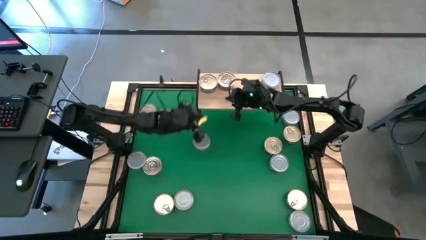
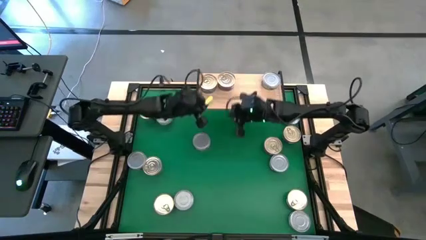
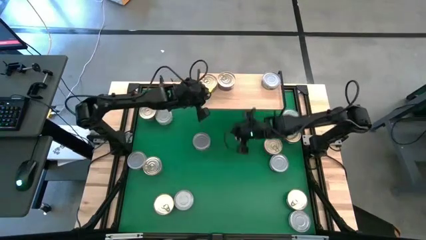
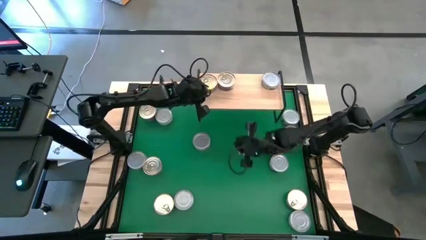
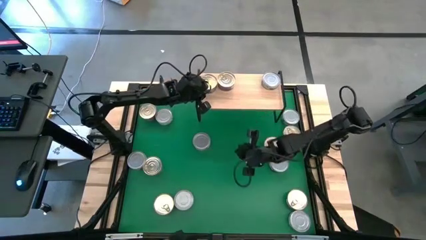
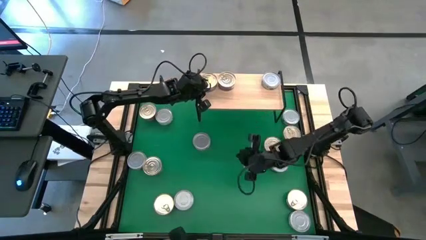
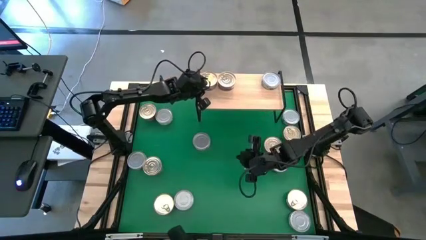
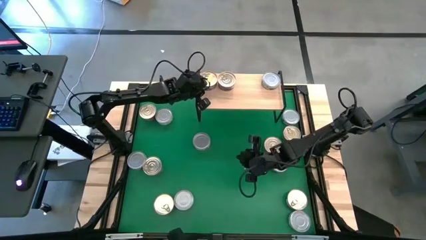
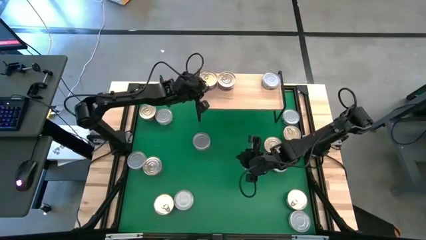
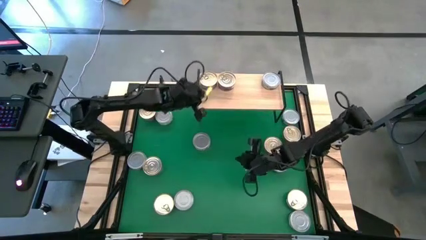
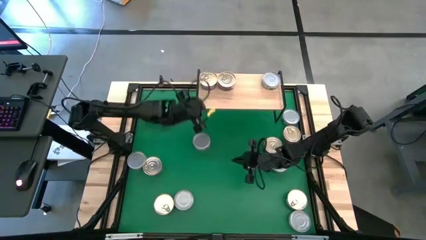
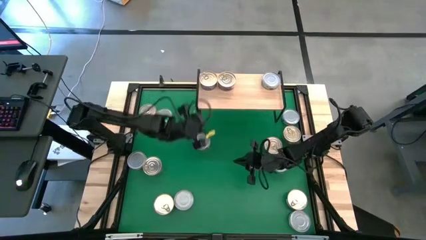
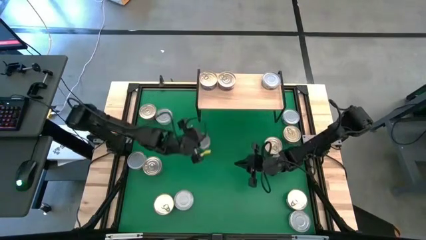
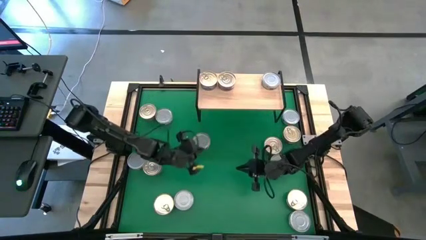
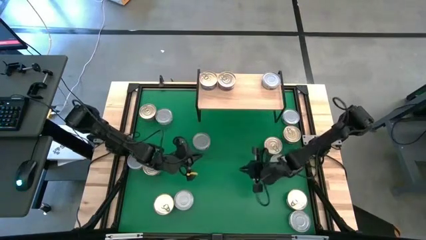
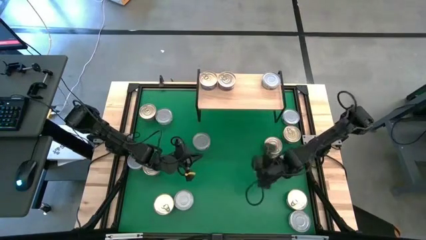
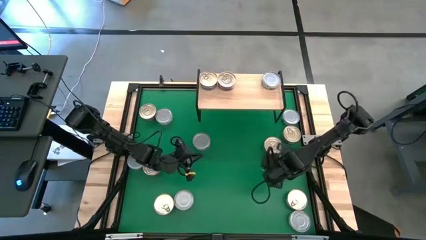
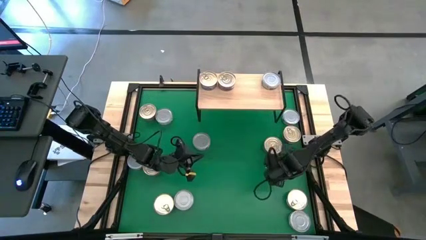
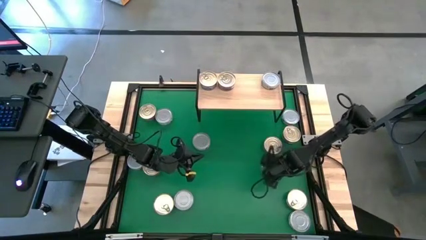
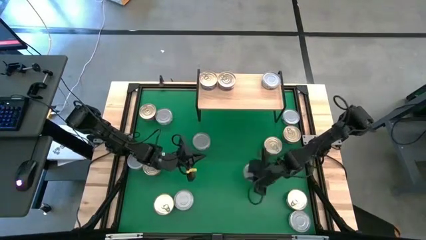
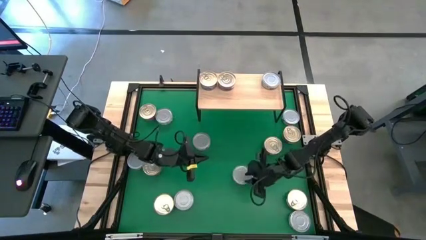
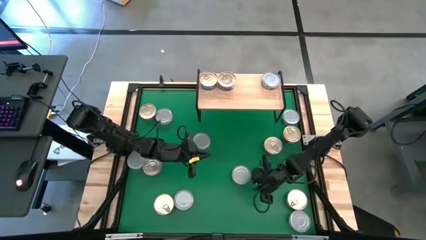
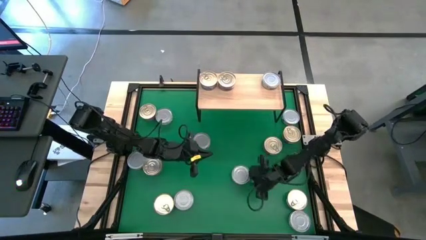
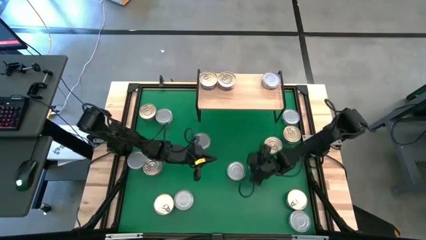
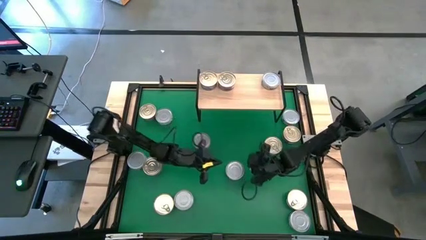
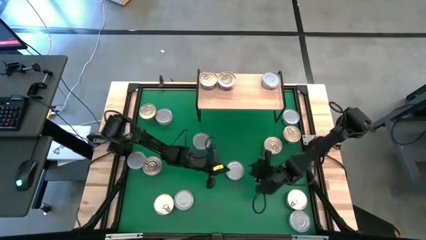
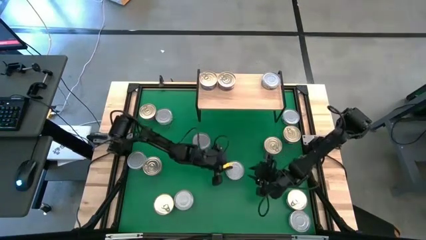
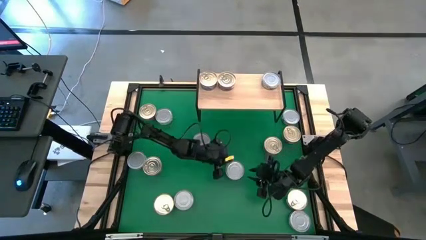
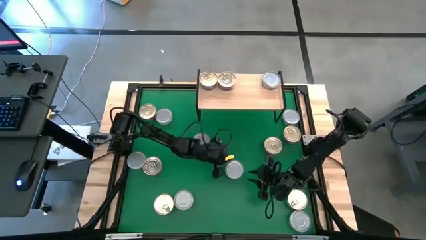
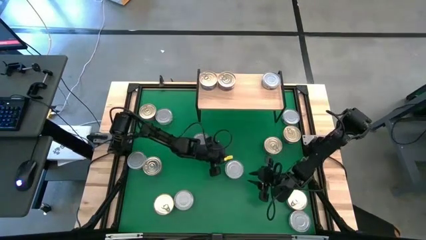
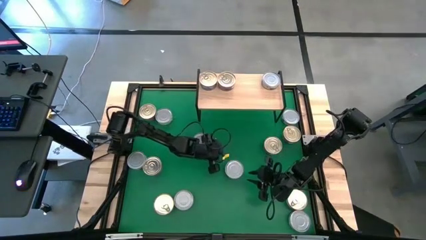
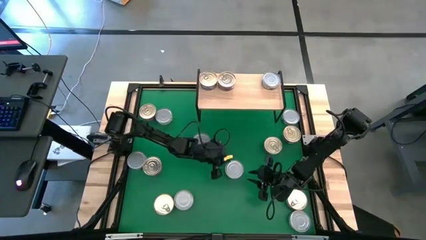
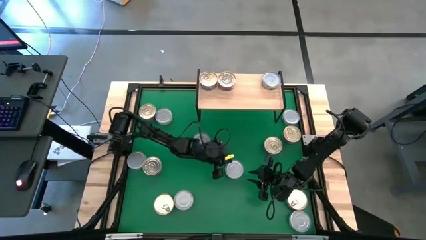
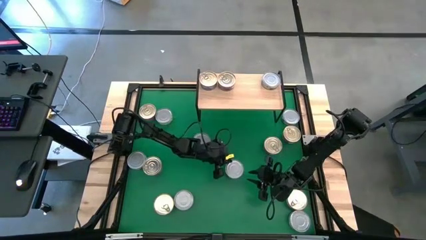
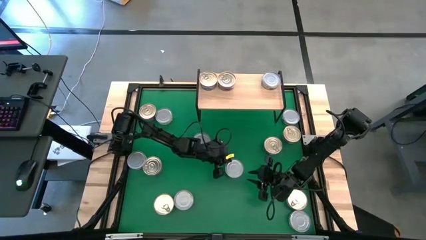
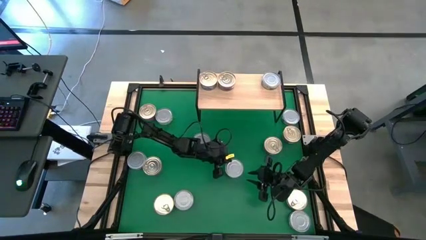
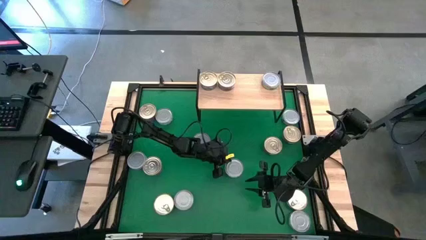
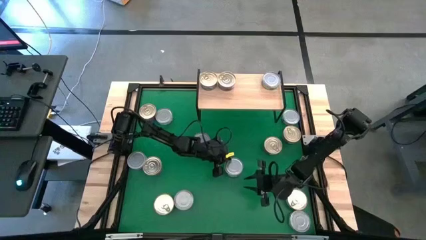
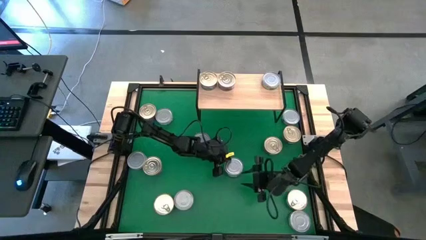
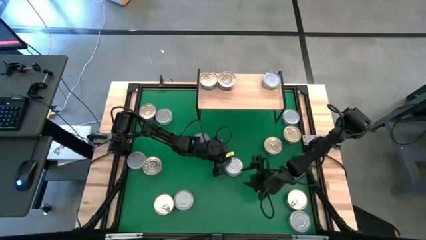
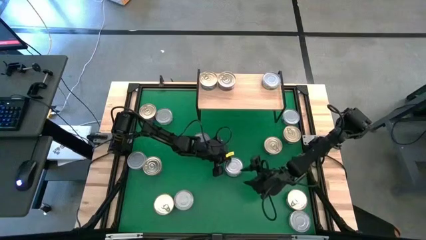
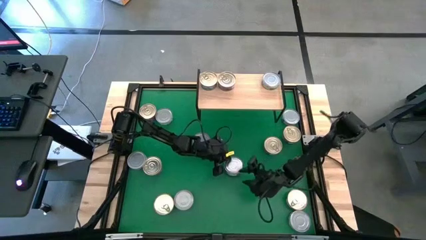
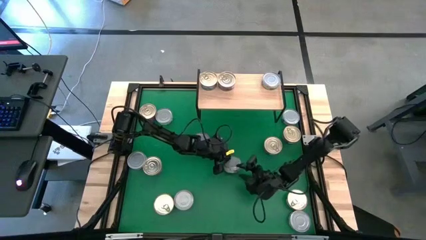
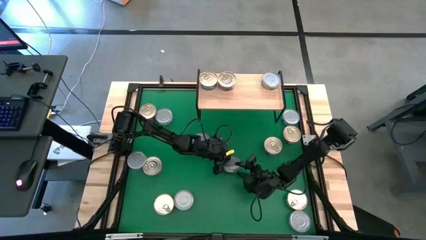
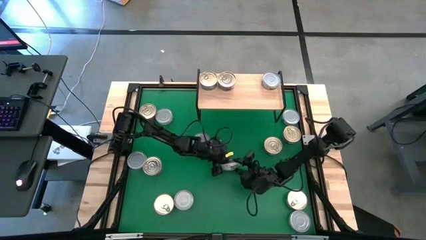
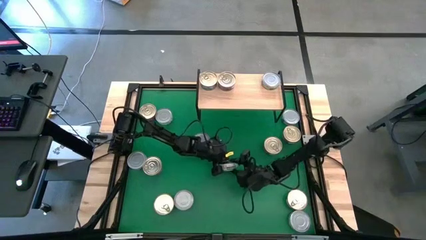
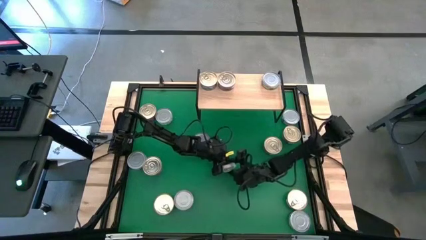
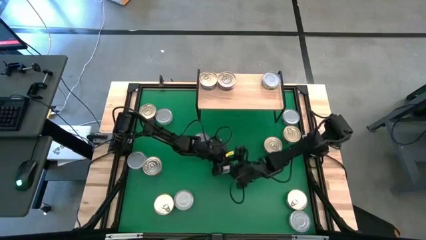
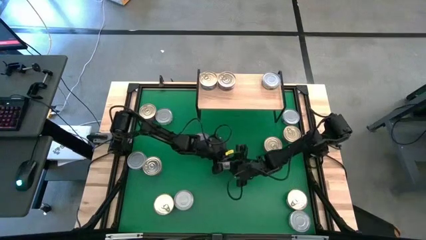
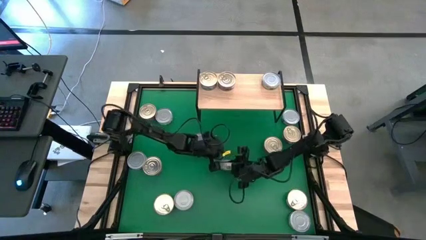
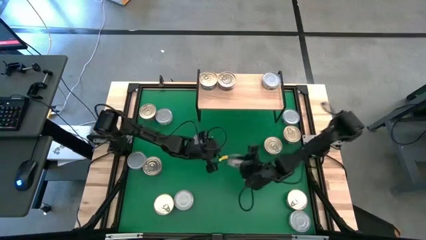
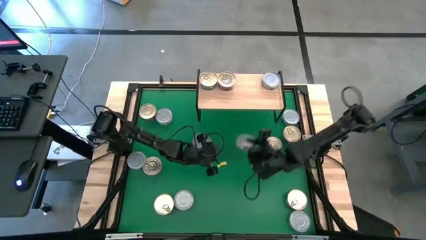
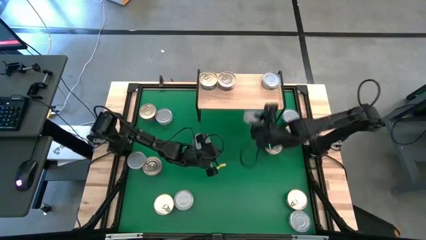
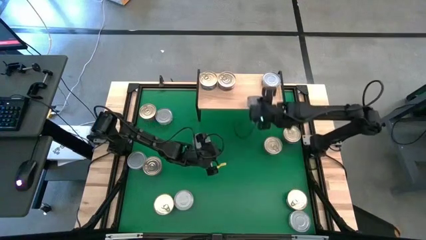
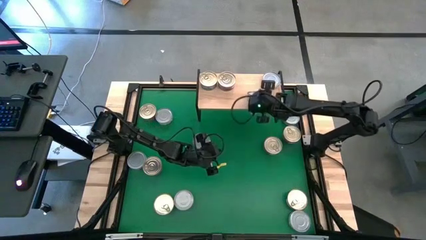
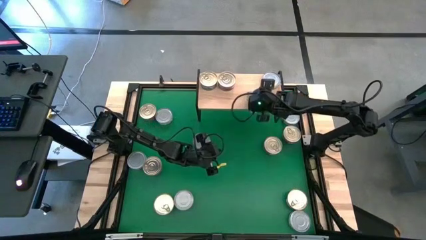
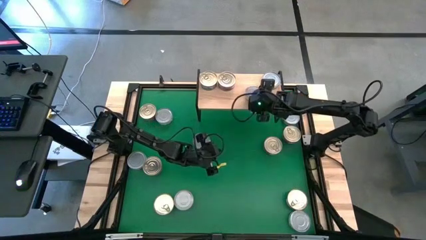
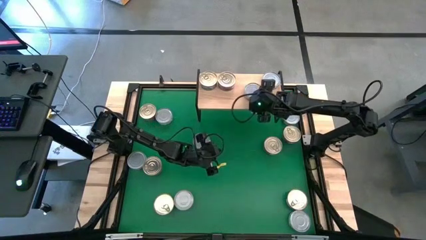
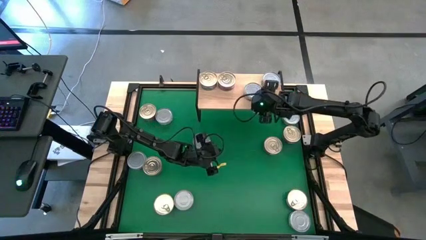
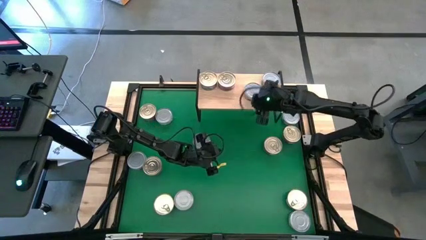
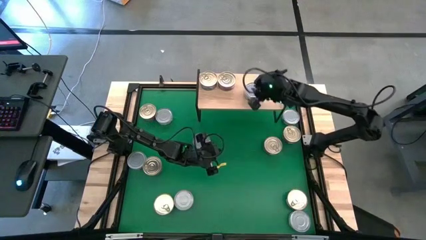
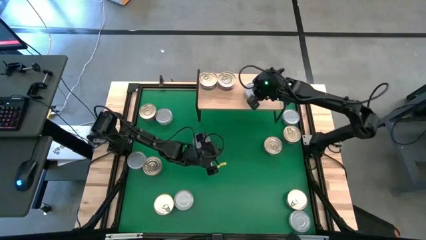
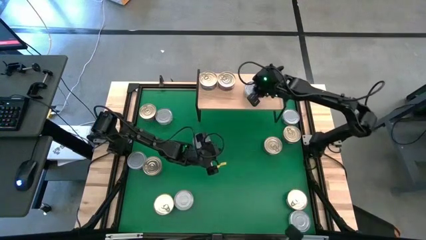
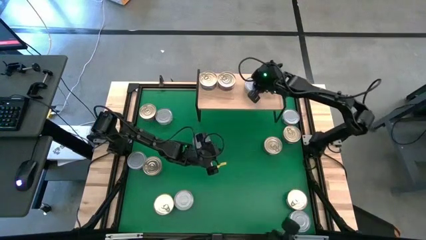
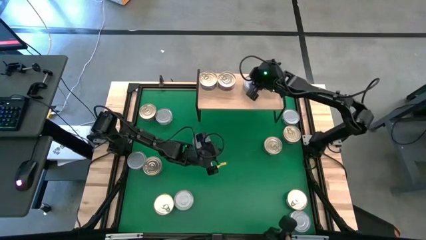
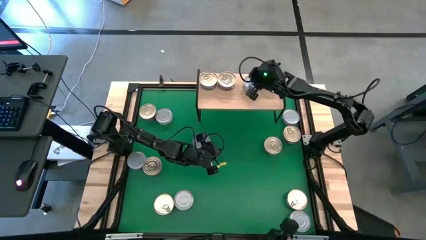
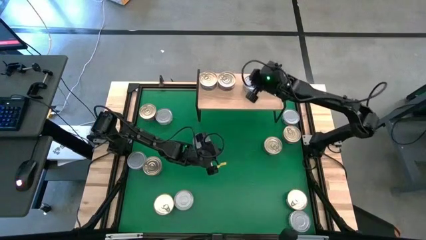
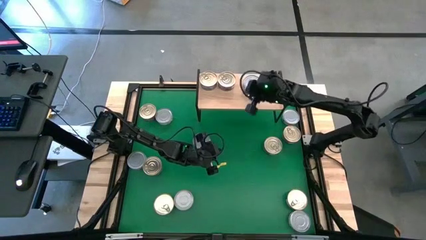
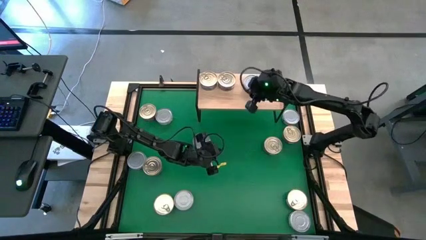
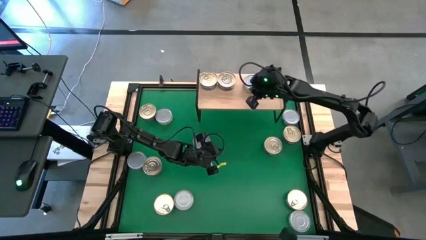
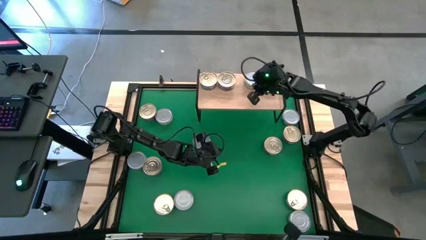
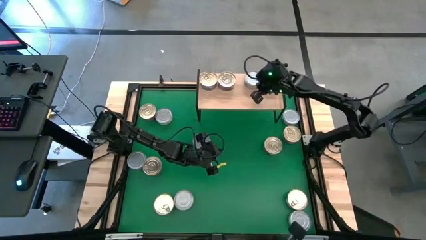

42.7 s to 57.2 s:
Task: Stack canned seafood by type on shelf
Put the green tuna can on the shelf

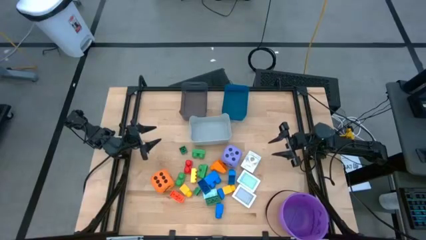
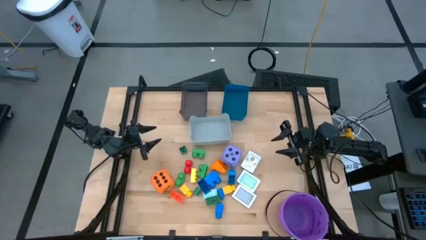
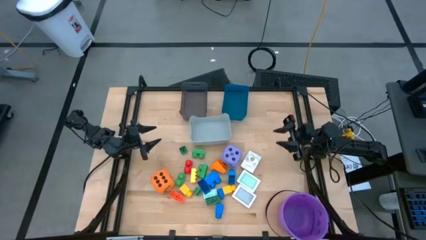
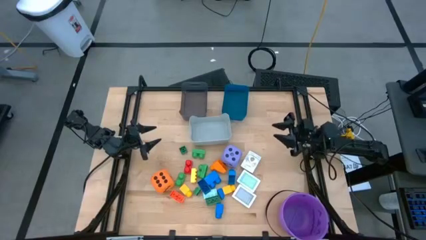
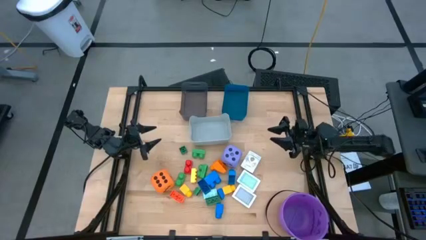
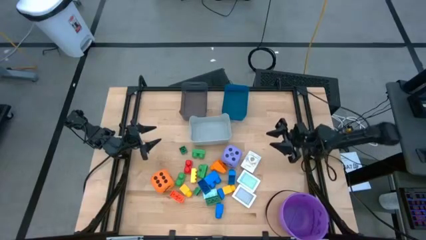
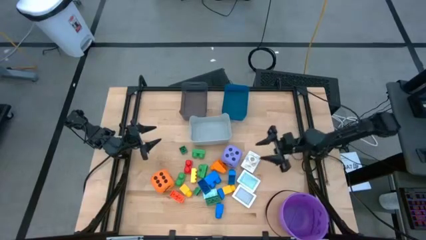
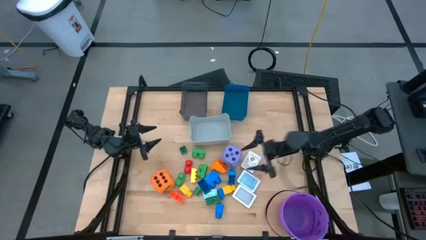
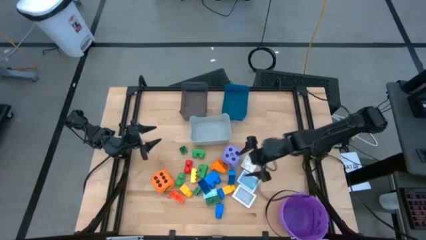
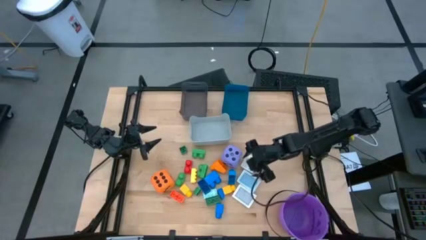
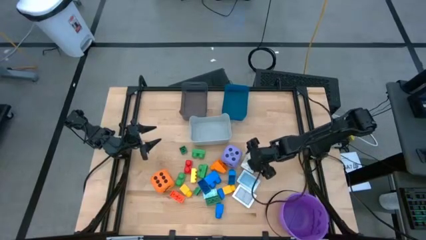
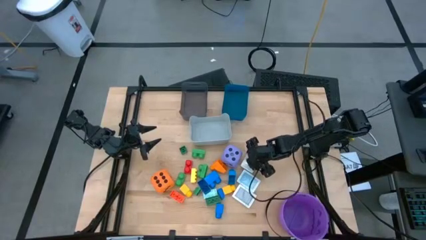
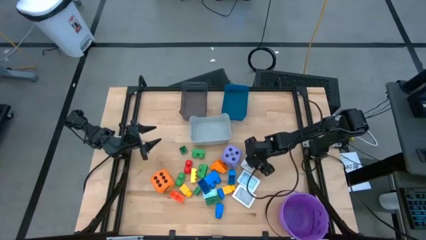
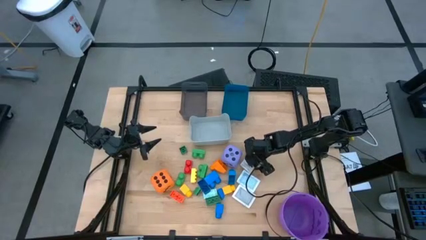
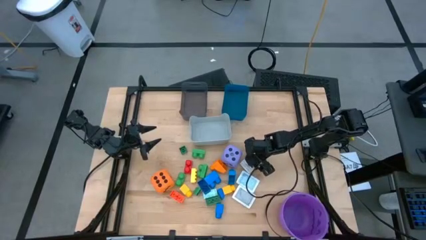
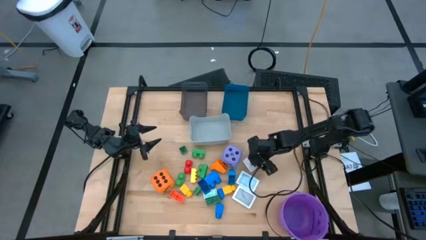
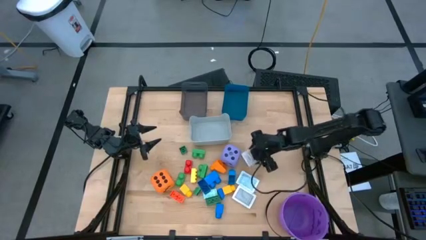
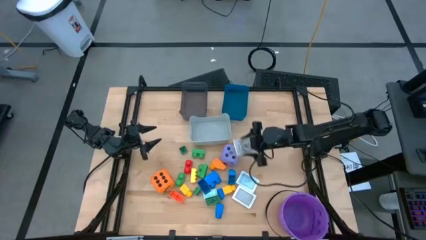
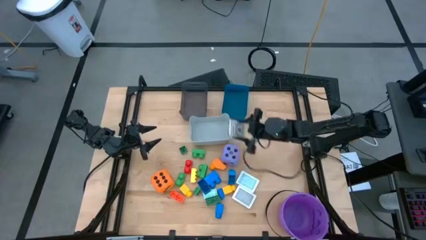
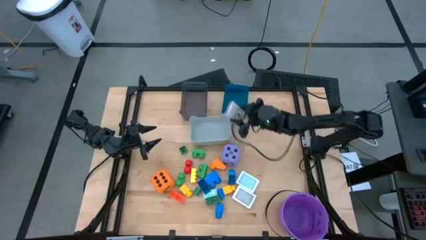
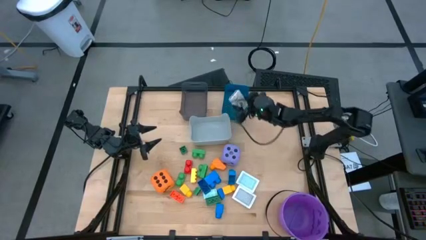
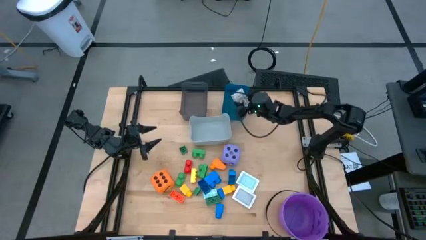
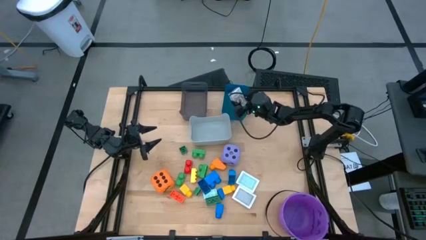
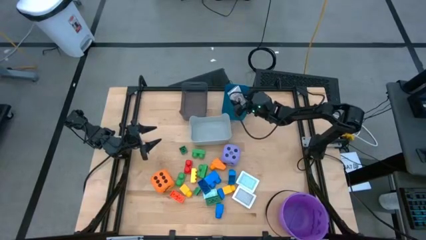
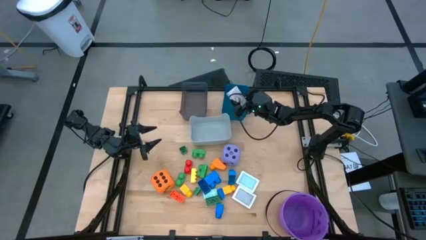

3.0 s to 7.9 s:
Task: Pick & Place Toys
Put the brown deck of cards into the blue bin
